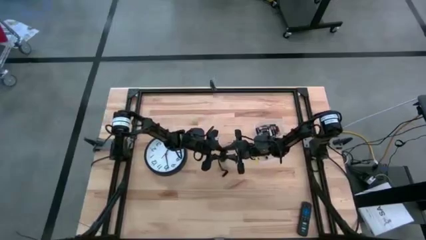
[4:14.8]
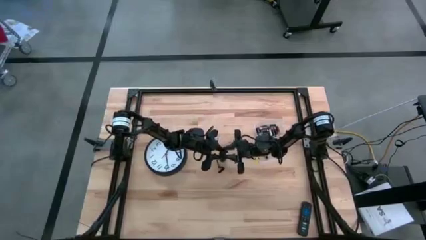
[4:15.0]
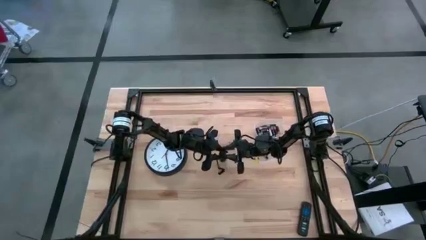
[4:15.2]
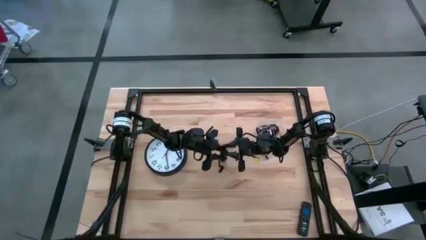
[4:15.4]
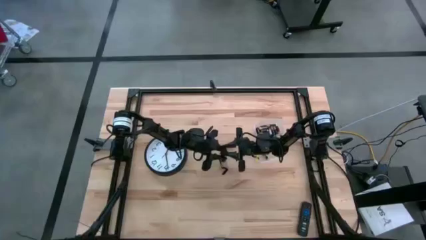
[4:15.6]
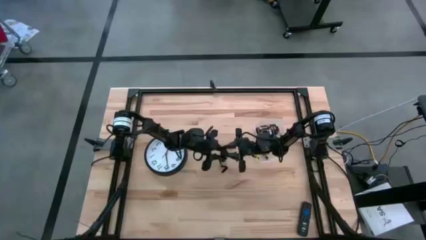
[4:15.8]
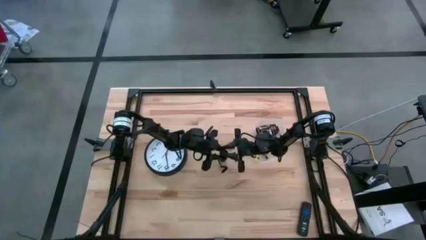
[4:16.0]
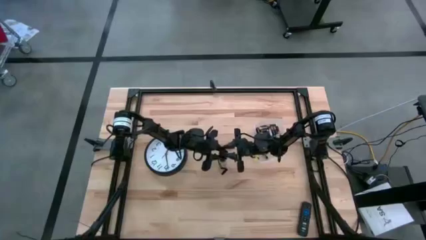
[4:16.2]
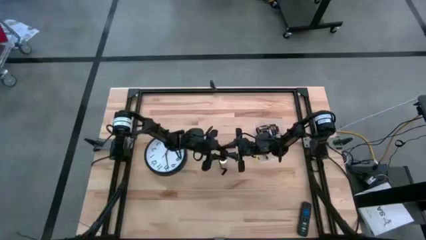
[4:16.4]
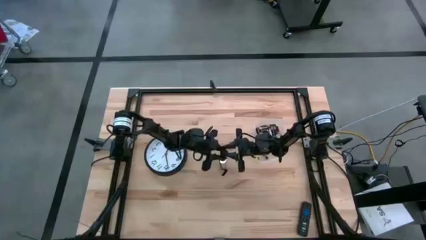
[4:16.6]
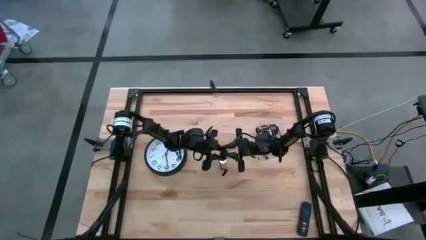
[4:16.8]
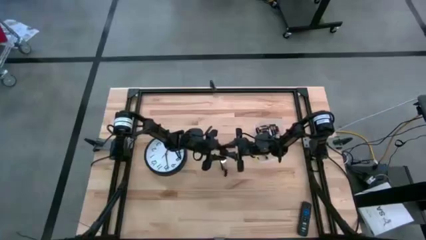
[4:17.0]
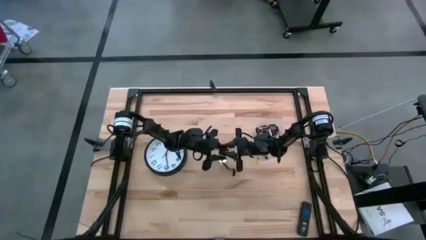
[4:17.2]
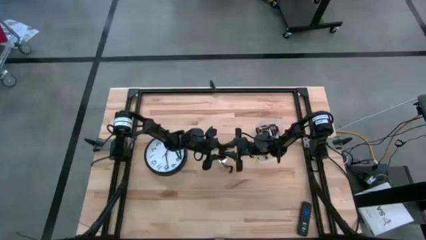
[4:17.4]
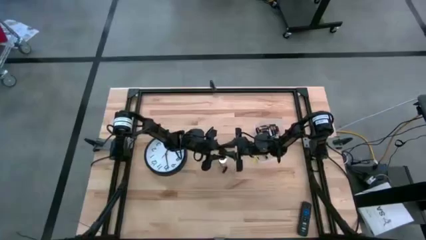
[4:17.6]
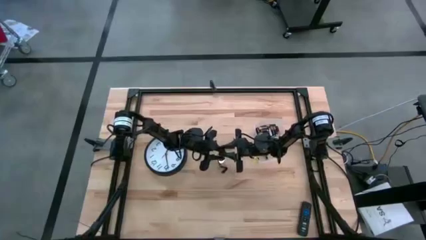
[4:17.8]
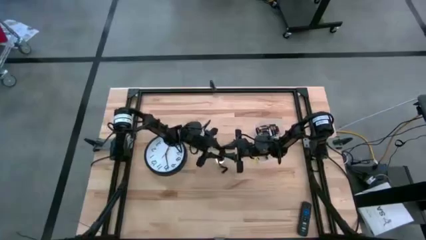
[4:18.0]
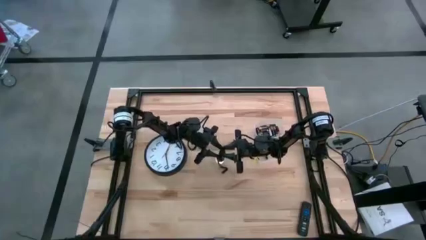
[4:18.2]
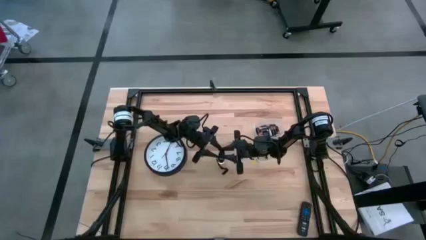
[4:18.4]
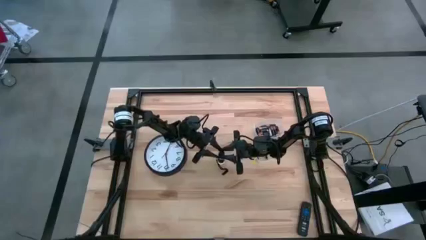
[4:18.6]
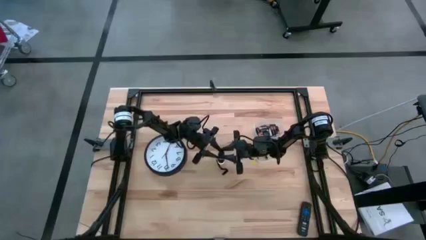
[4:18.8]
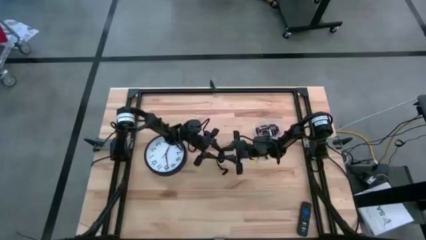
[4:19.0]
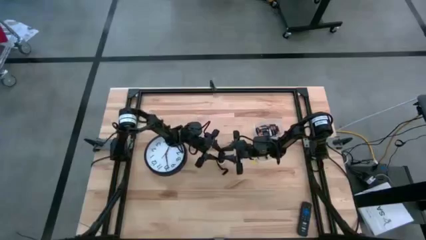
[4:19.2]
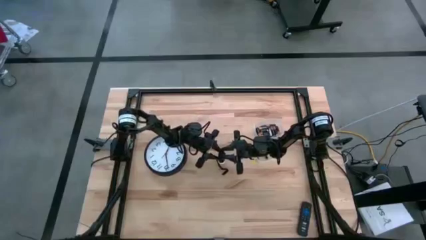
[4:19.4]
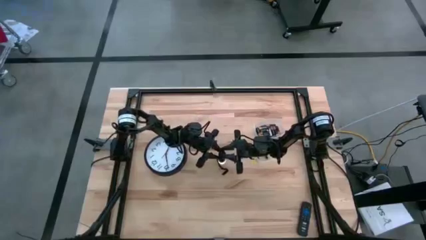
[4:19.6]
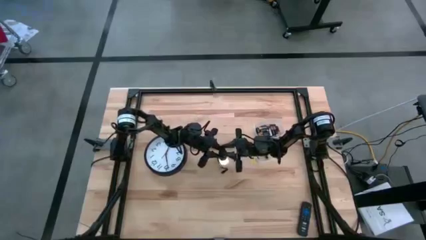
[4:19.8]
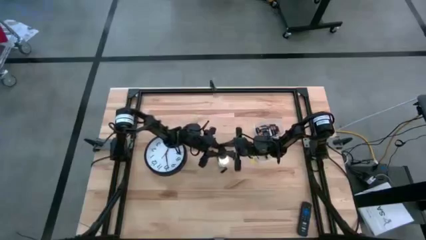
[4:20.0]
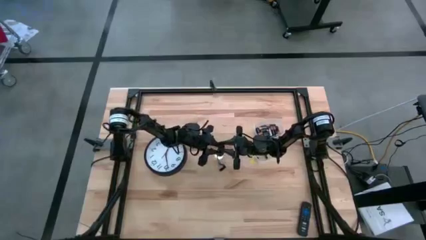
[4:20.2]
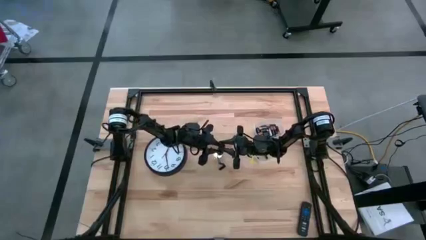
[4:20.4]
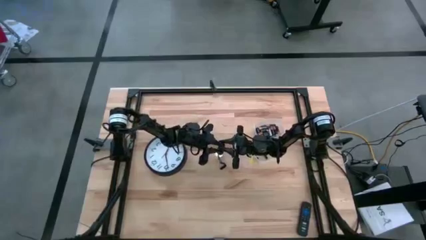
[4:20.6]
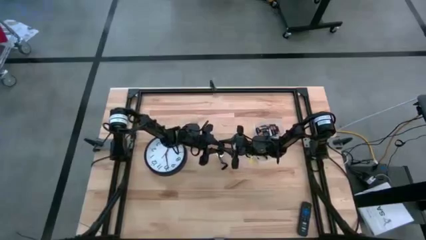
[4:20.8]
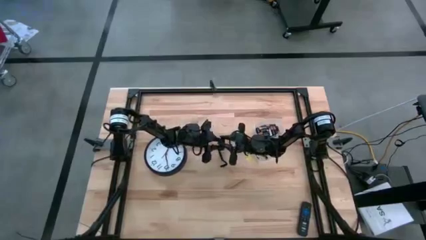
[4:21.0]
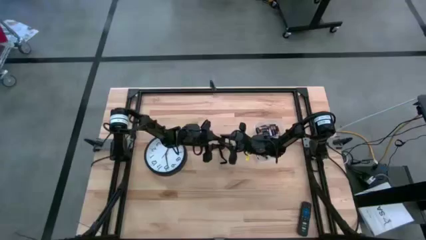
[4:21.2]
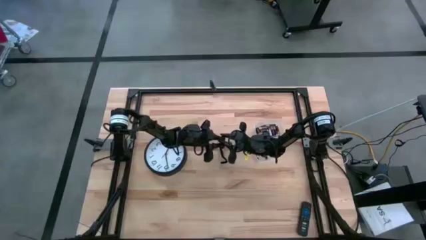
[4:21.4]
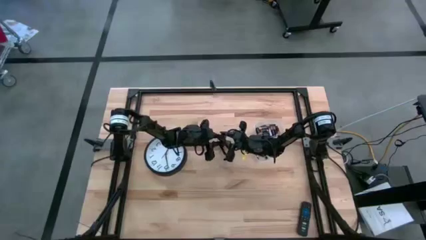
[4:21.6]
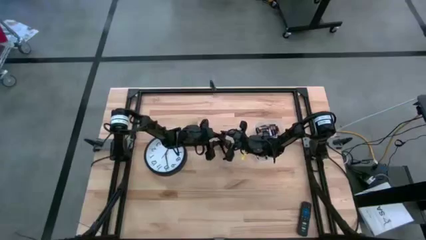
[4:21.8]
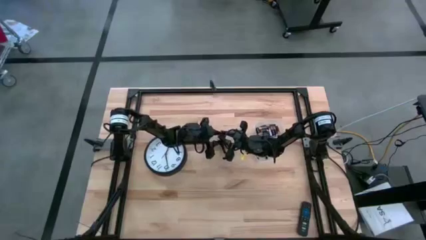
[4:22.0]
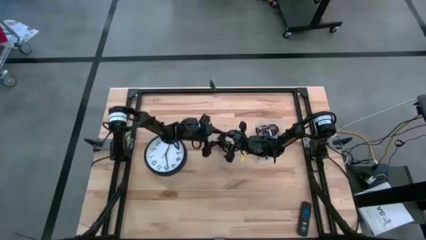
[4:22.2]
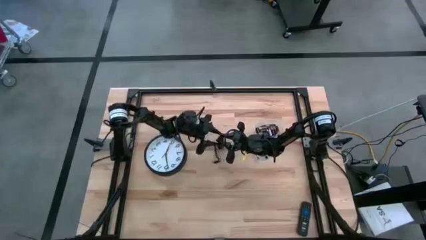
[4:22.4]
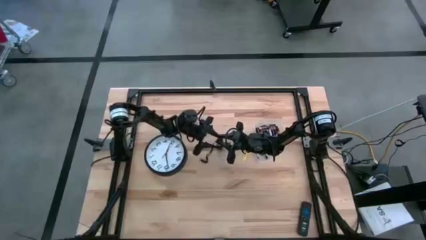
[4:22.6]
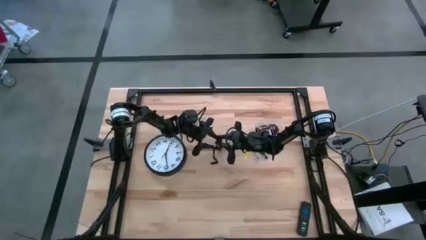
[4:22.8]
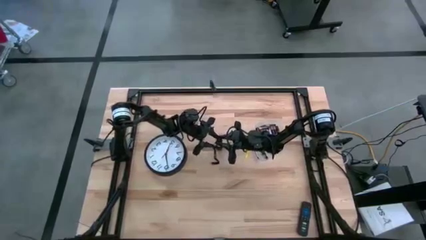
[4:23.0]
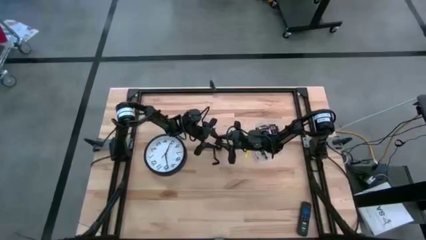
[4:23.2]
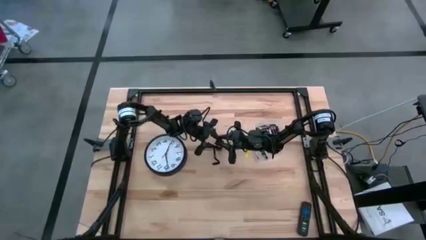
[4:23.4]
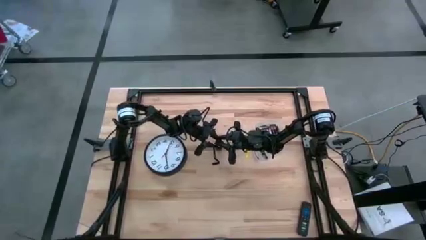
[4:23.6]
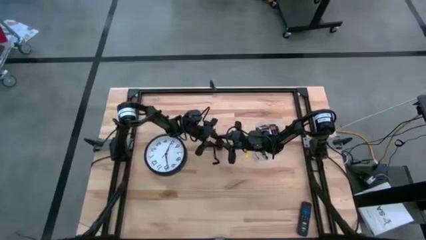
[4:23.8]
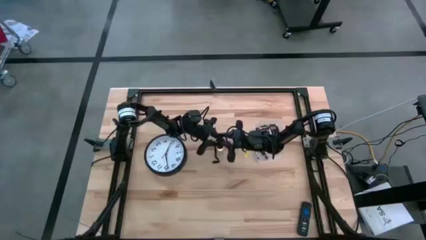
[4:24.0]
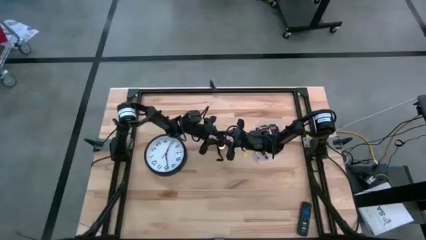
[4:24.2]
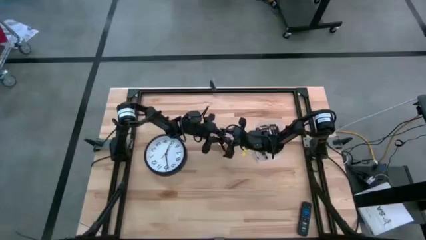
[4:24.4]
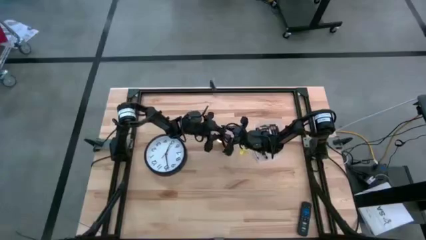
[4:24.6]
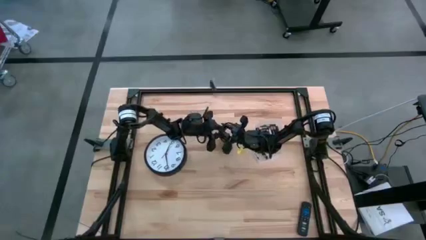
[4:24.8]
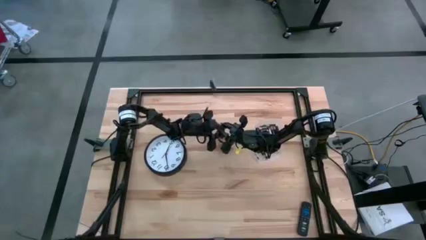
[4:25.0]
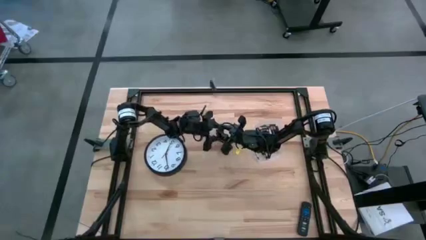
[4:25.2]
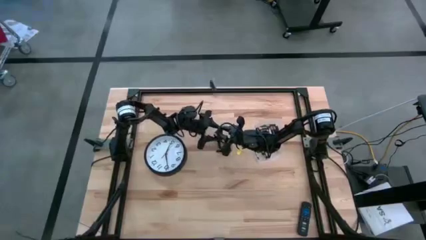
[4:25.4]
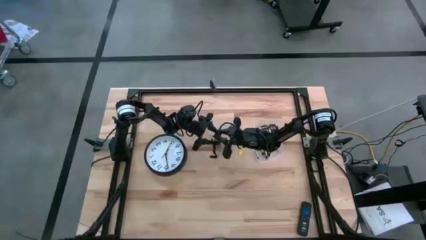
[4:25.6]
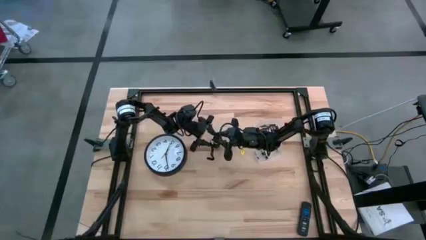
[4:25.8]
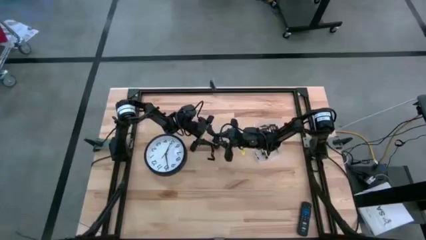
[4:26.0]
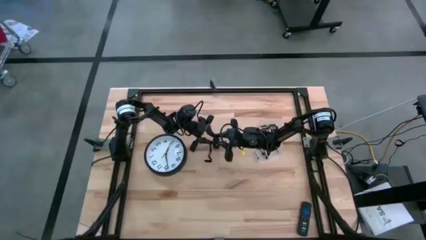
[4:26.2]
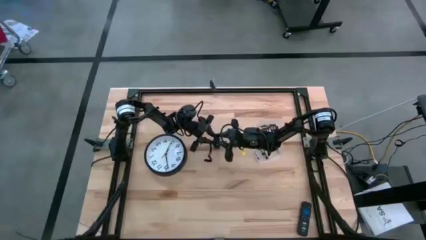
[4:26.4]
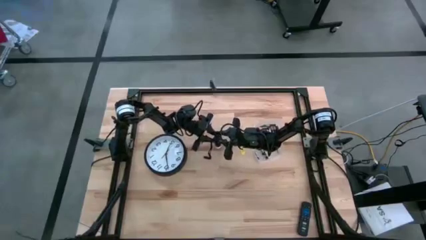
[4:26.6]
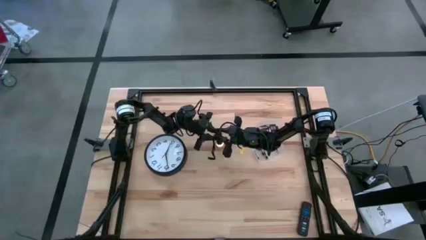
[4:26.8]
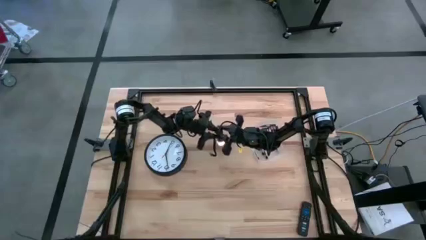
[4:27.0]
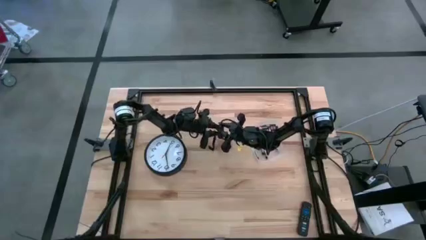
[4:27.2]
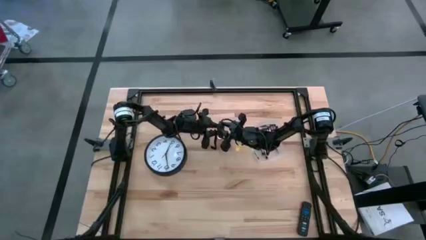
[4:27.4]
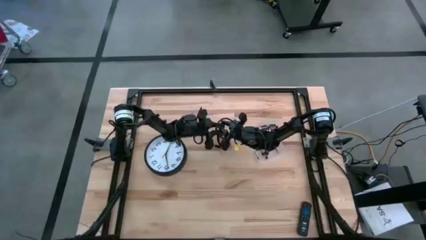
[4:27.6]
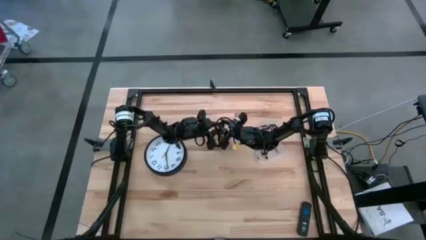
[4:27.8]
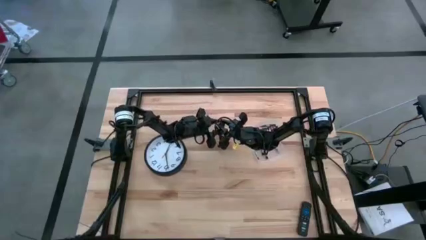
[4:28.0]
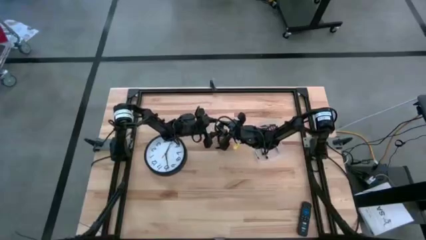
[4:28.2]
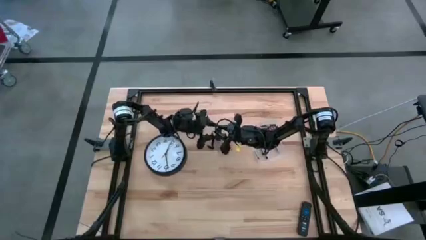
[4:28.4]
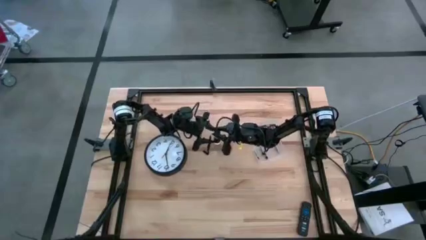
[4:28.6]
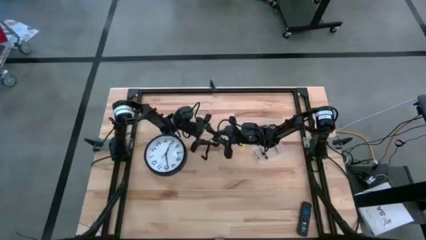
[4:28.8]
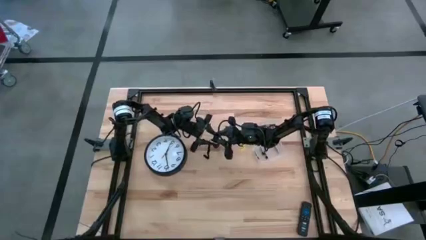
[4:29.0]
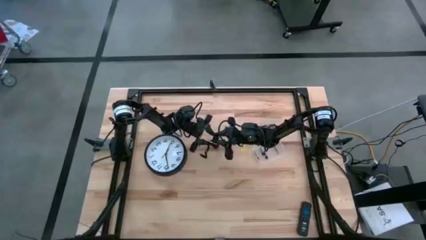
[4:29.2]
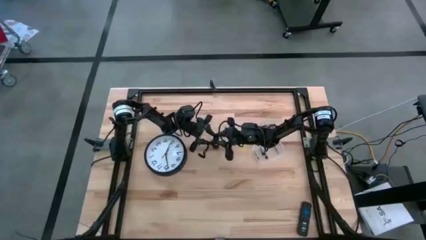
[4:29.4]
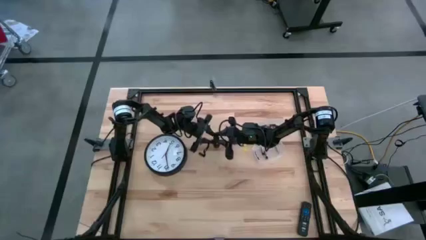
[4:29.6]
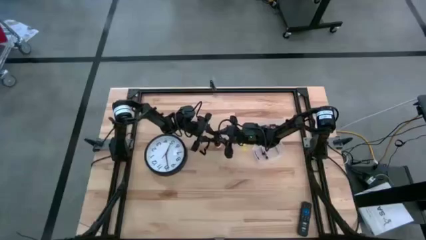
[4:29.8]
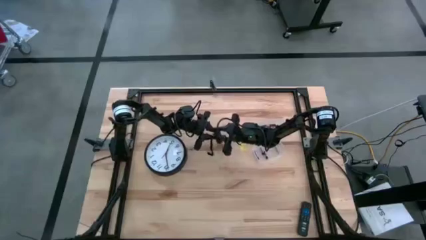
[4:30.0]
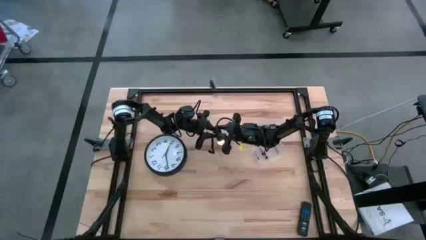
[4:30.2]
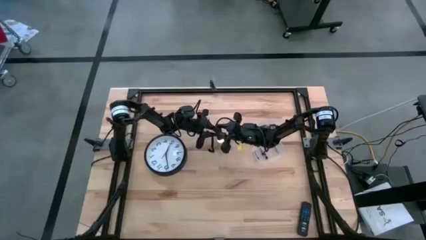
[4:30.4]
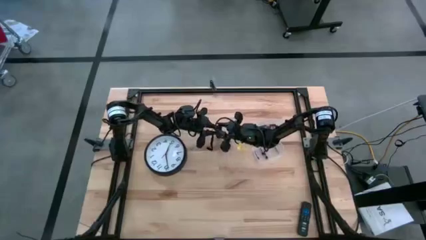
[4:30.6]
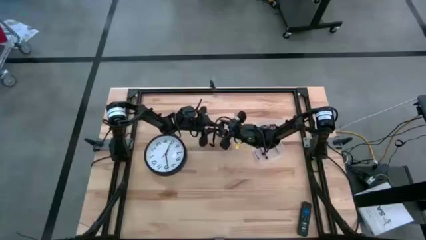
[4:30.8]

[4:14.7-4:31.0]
Task: Insert battery
Close the black battery compartment
